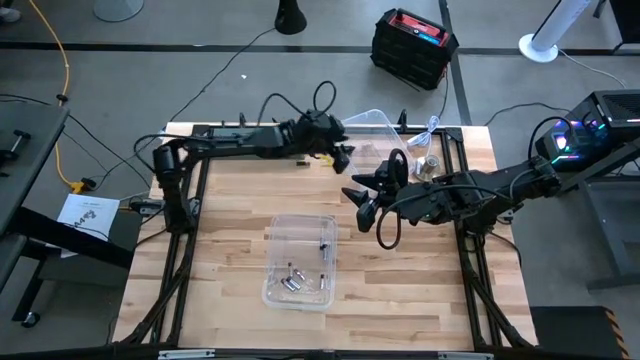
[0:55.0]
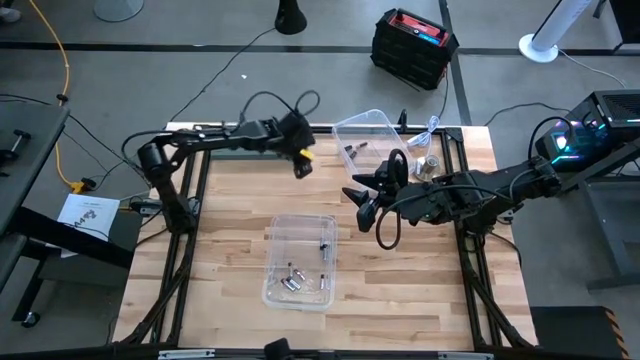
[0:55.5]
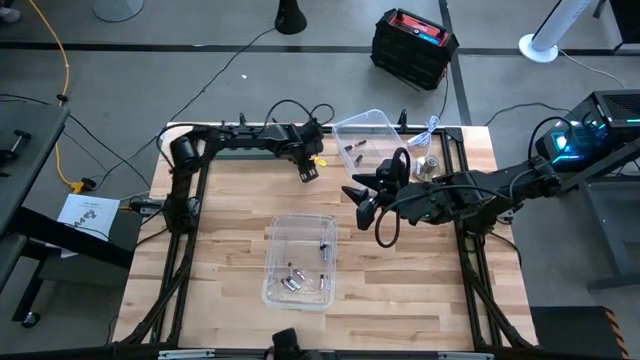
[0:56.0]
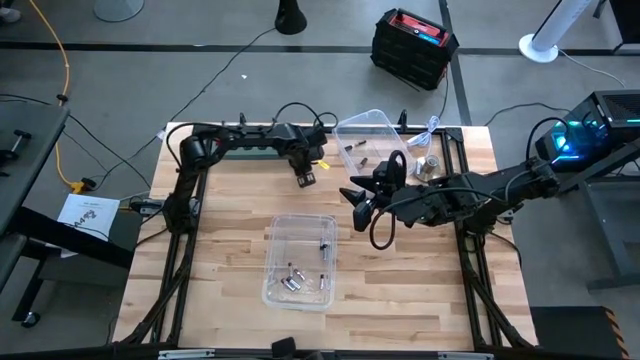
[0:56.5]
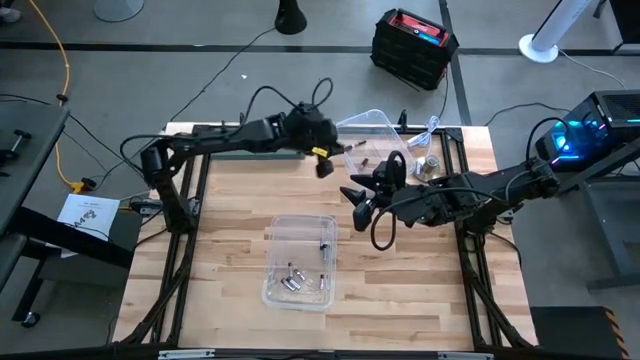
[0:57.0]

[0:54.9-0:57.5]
Task: Sort batteries
Put the black battery into the right transparent bin

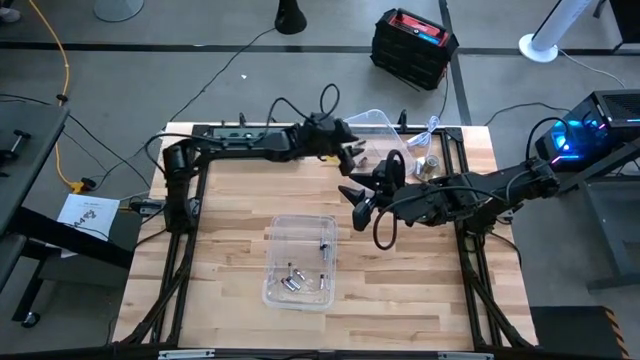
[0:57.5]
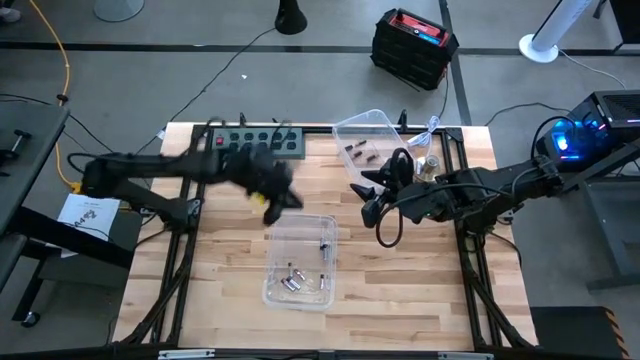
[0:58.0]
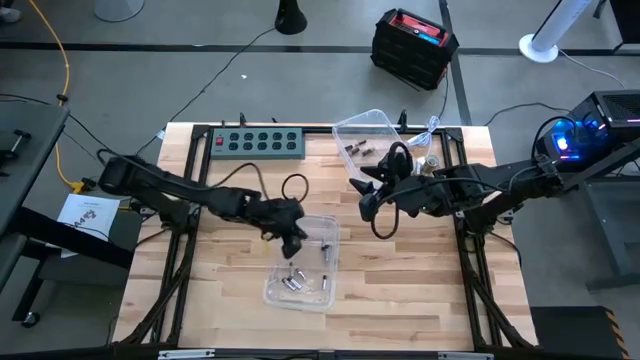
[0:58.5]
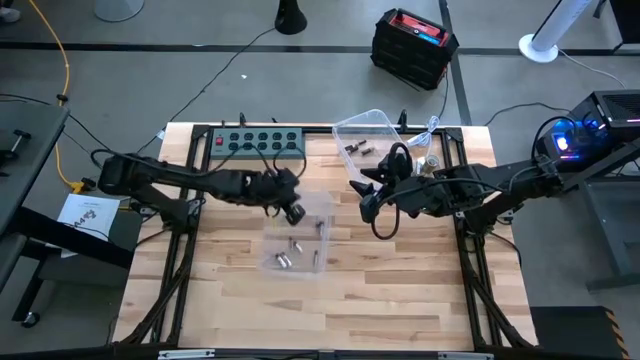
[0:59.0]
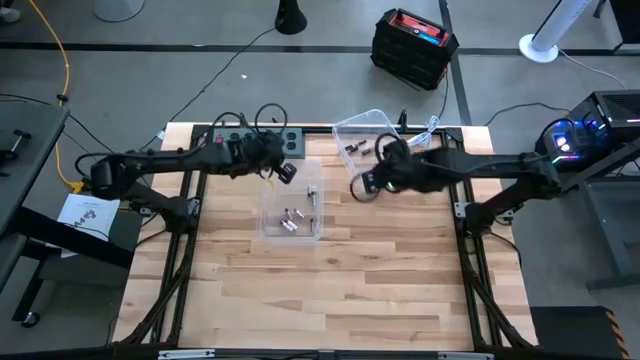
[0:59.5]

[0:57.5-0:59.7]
Move the left transparent bin to the center of the table

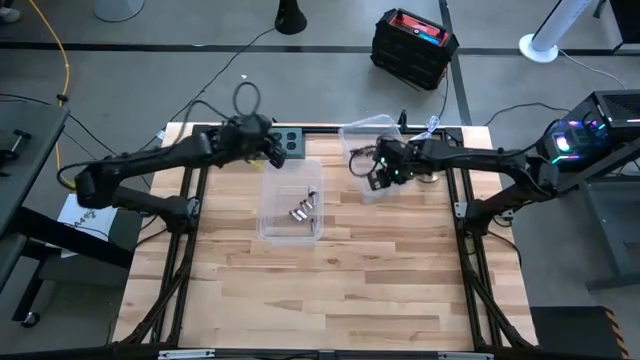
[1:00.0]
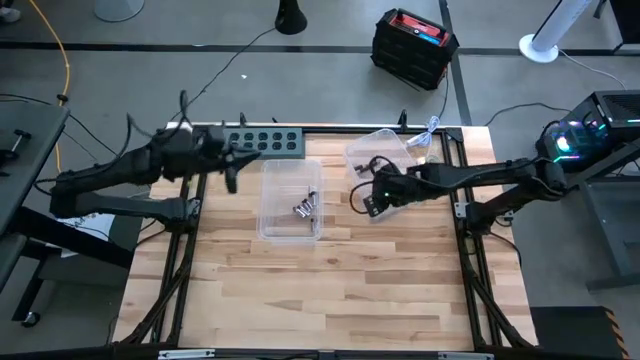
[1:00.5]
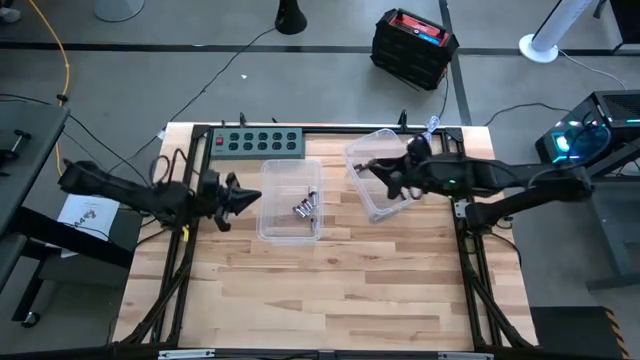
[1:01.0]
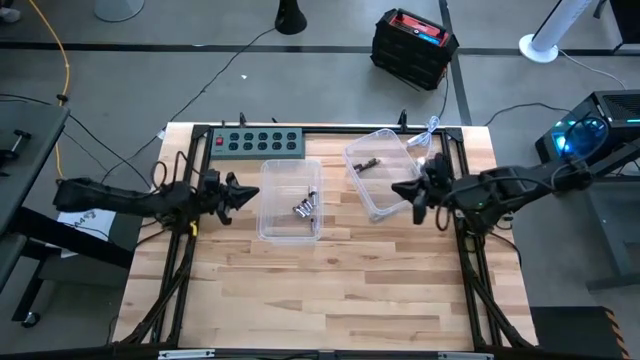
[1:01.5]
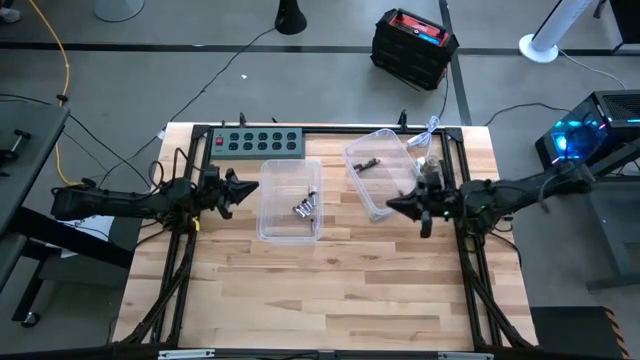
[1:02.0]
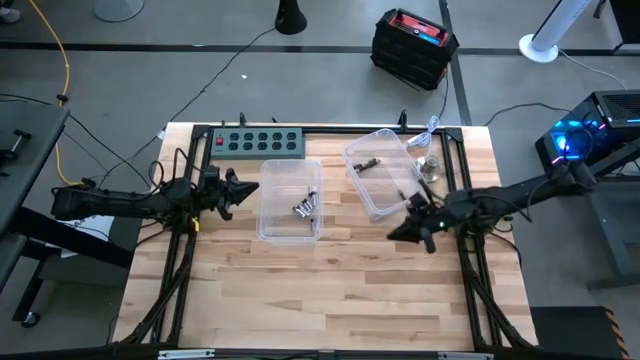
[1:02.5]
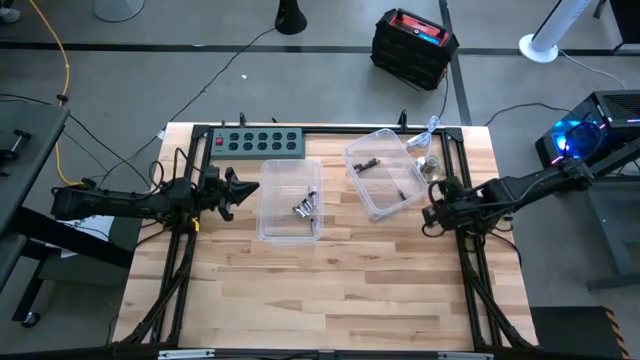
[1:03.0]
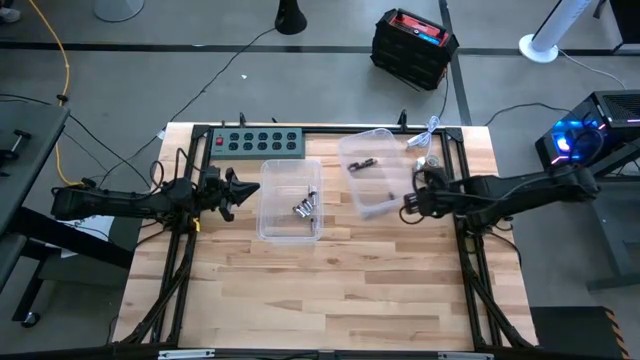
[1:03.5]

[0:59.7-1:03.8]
Move the right transparent bin to the center of the table

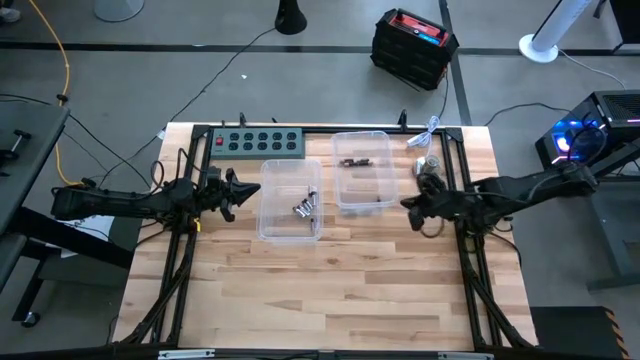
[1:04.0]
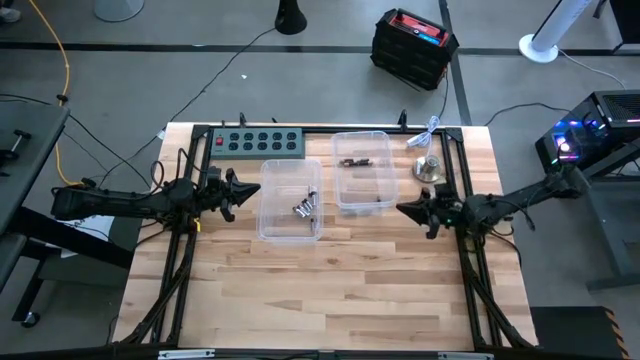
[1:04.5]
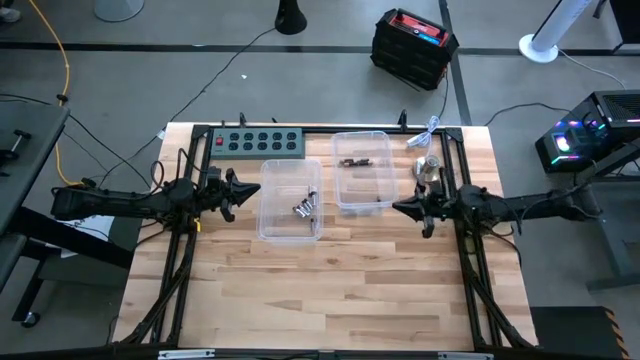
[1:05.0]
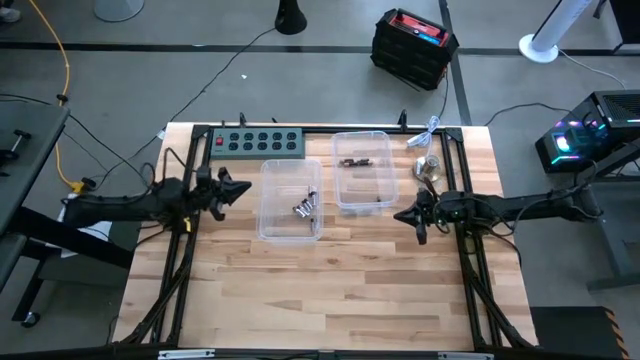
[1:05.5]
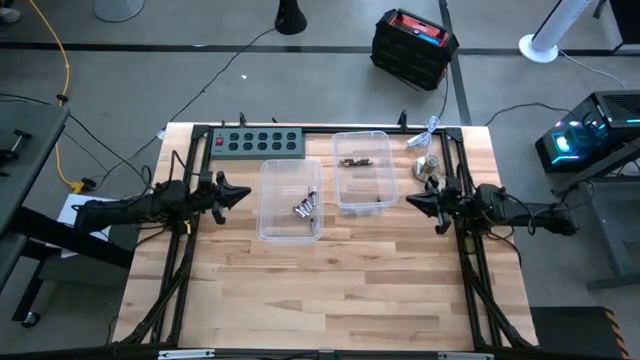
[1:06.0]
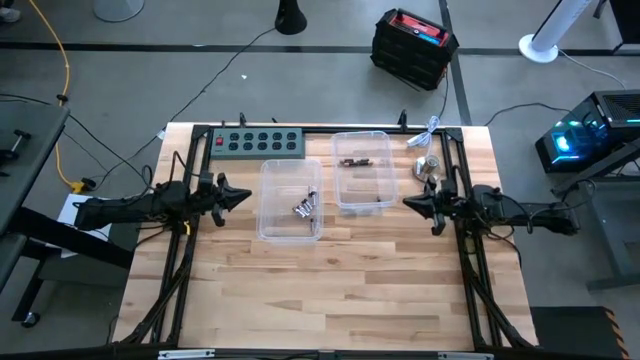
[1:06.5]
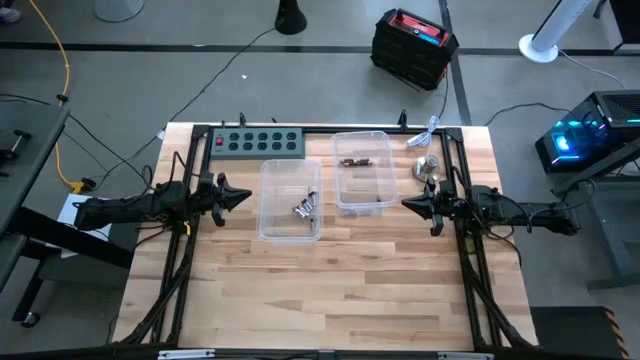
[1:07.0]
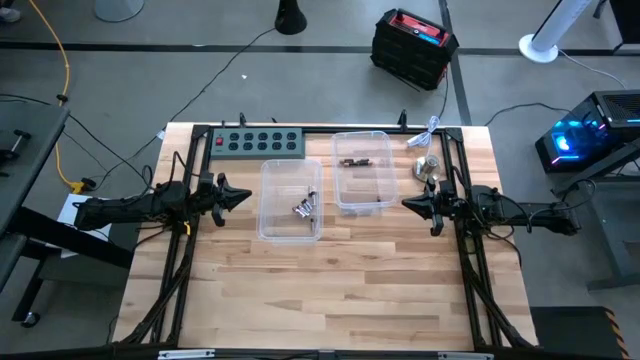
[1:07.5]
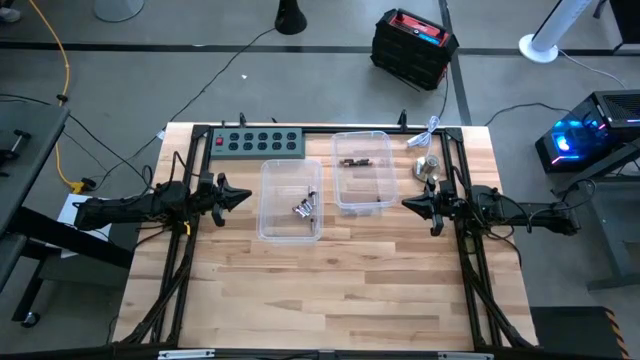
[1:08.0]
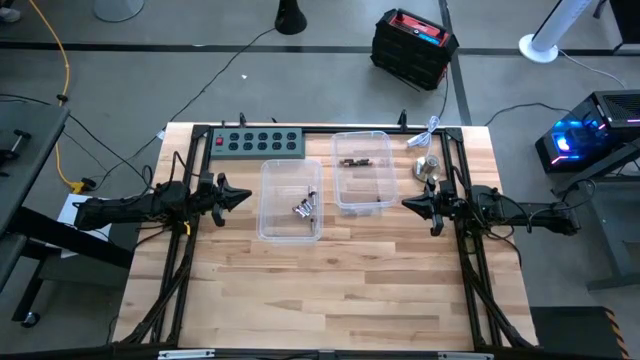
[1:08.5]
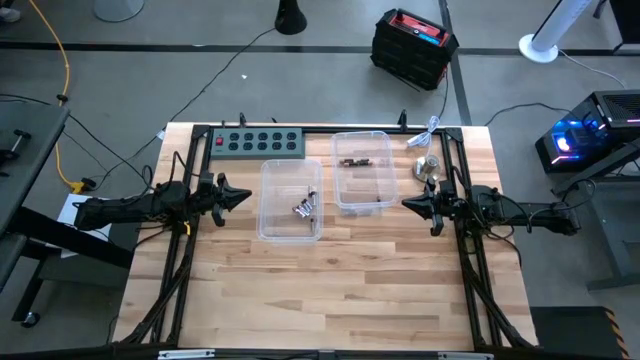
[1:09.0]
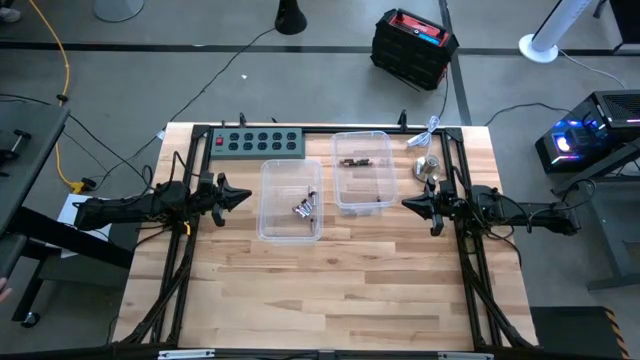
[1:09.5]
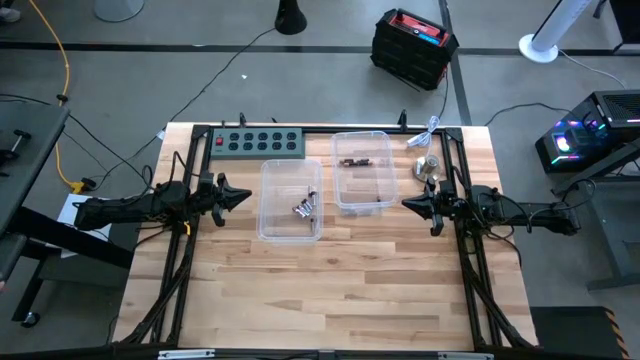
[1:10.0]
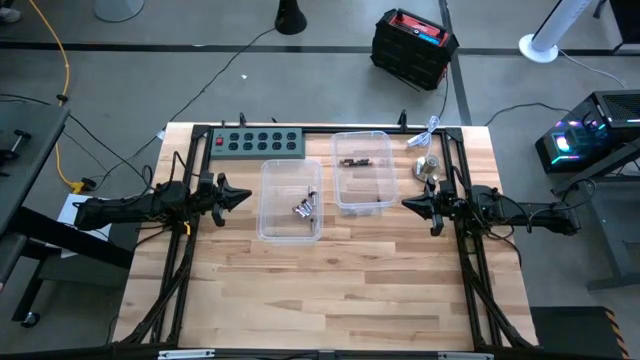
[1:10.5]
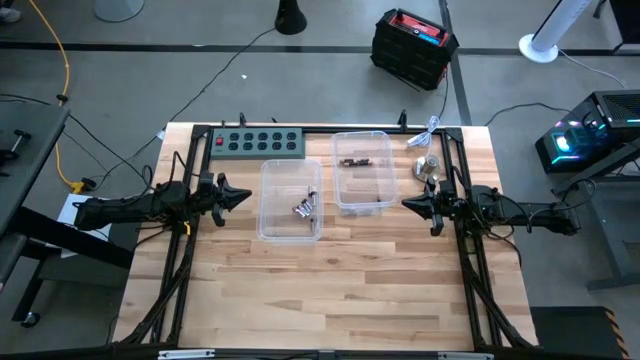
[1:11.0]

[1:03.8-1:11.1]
Return to Home Position

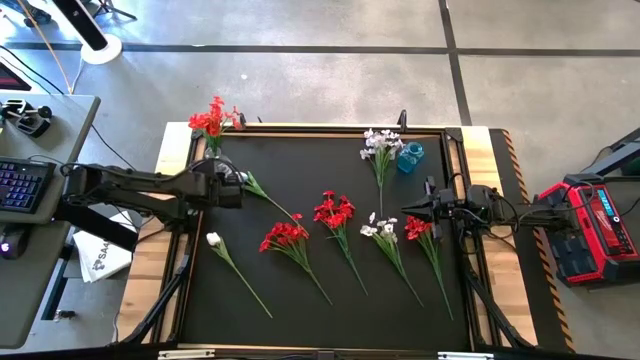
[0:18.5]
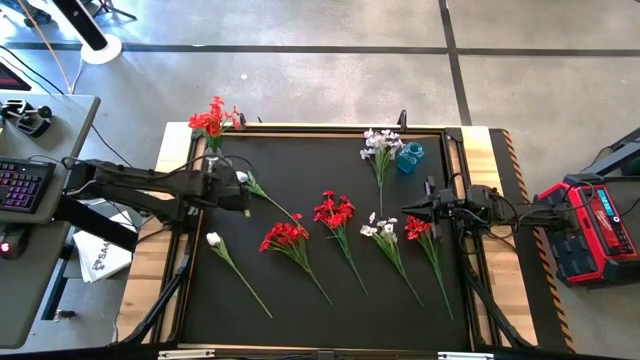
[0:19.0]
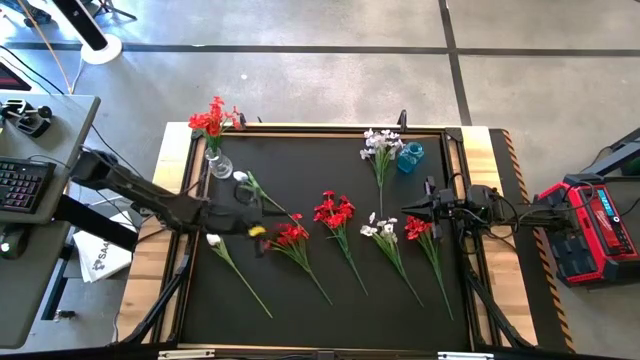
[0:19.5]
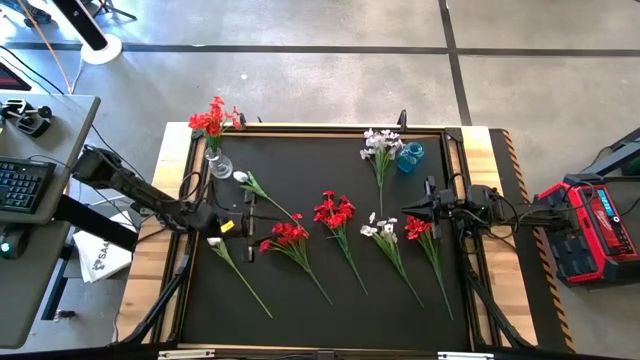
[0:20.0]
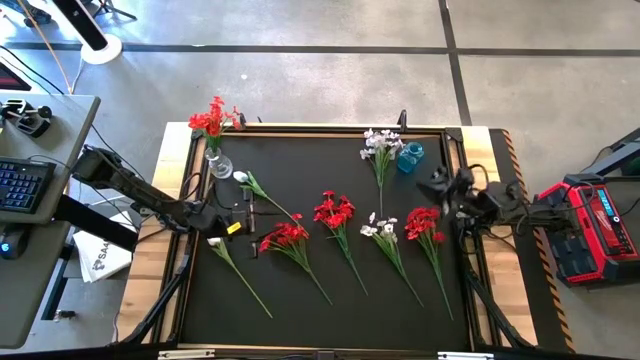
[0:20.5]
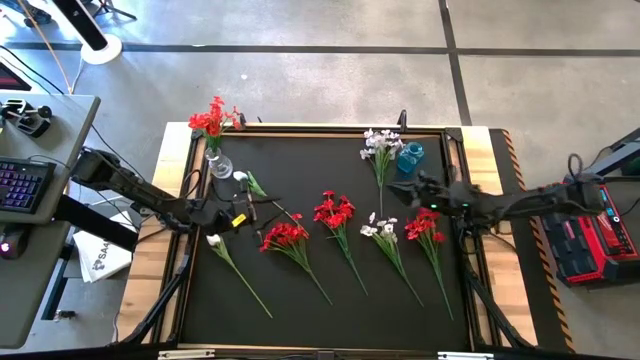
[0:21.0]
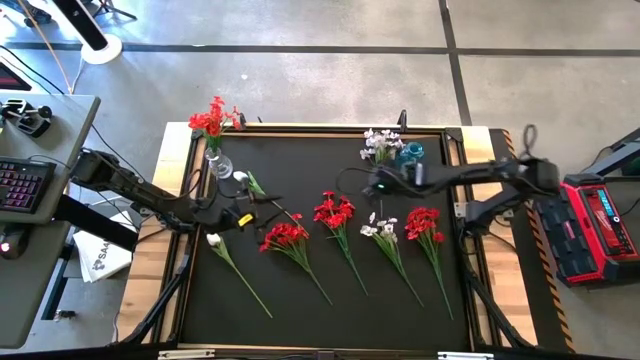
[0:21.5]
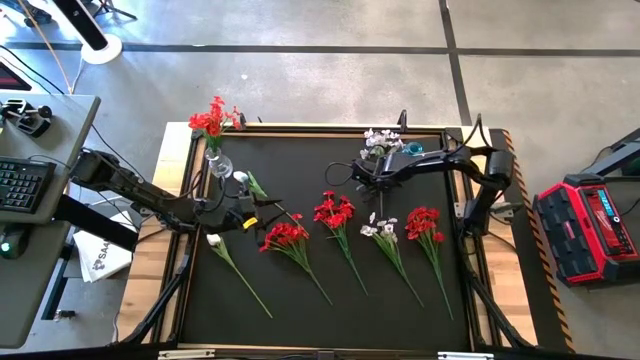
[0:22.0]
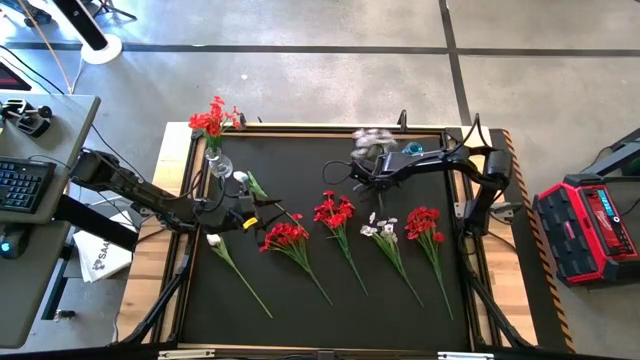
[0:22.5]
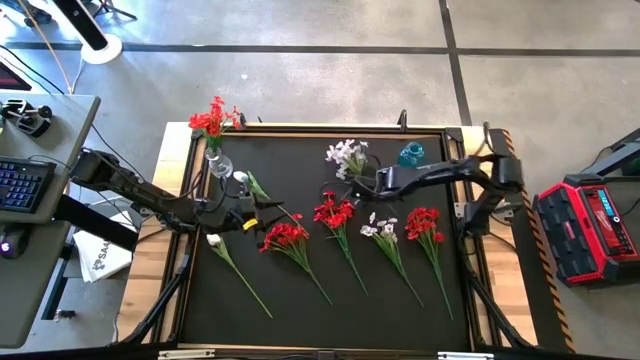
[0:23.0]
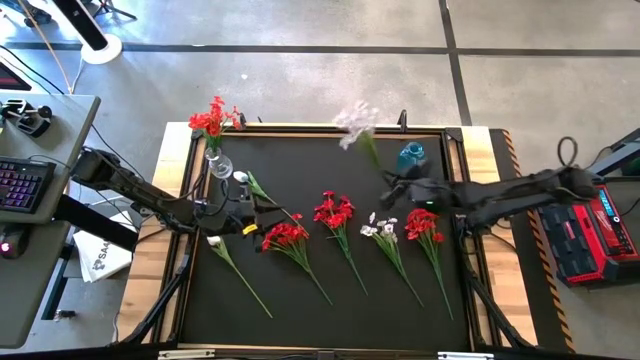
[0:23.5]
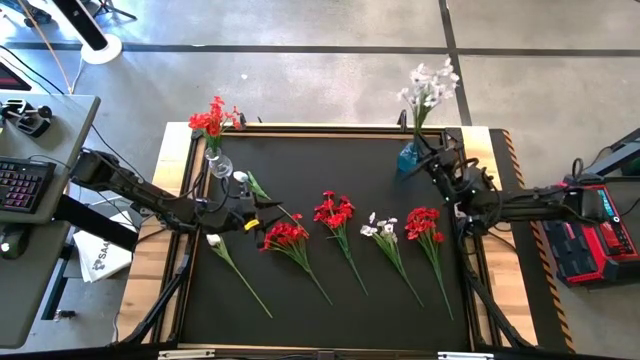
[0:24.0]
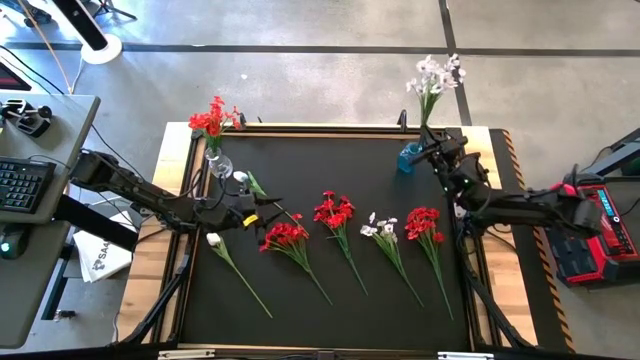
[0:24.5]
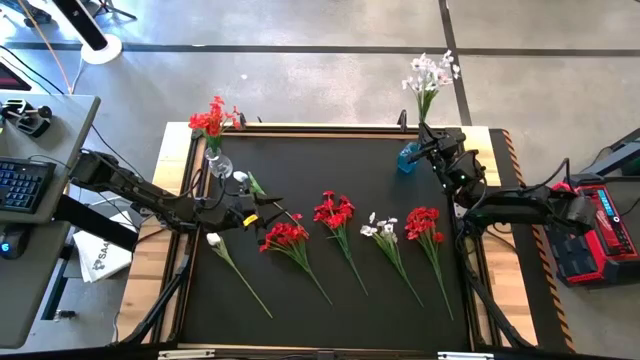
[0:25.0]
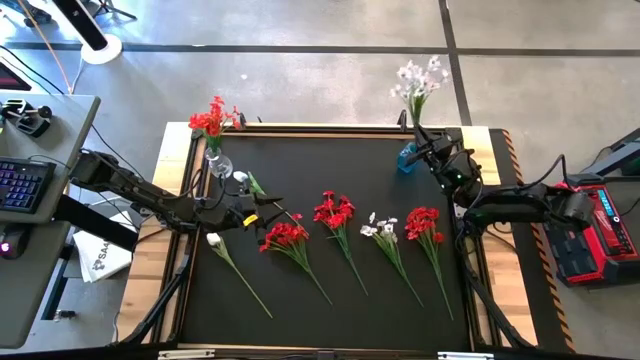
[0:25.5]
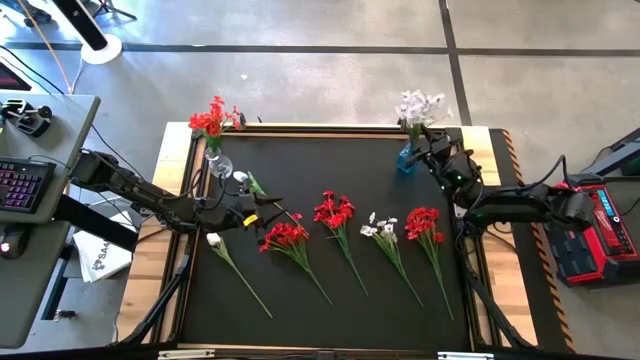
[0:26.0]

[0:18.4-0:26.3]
Task: Sort flowers into vase by color
Put the top white flowers into the blue vase
